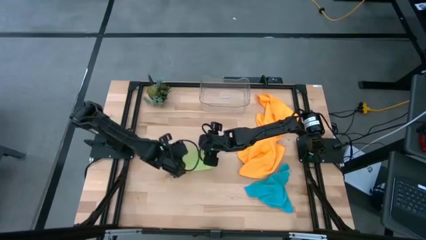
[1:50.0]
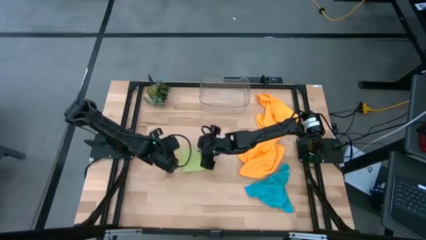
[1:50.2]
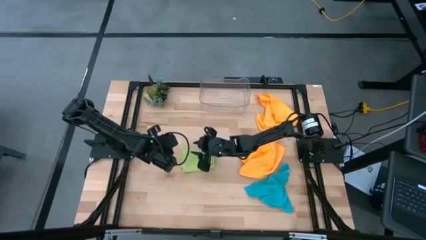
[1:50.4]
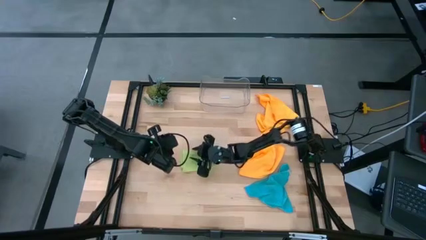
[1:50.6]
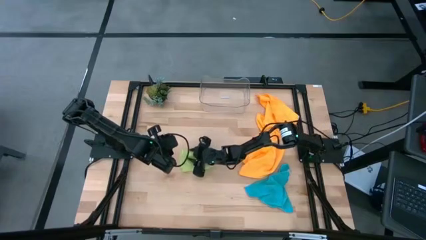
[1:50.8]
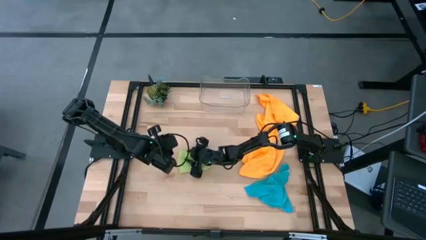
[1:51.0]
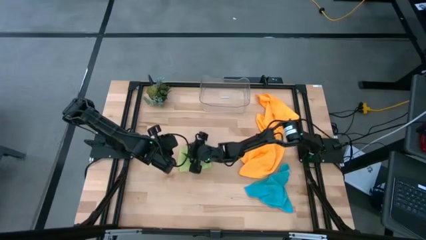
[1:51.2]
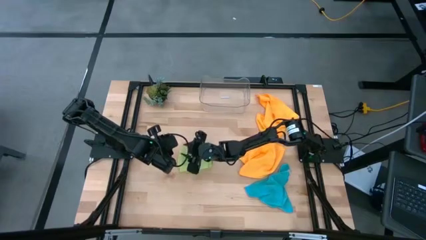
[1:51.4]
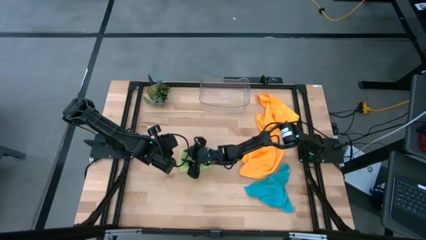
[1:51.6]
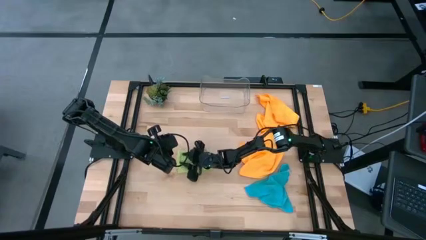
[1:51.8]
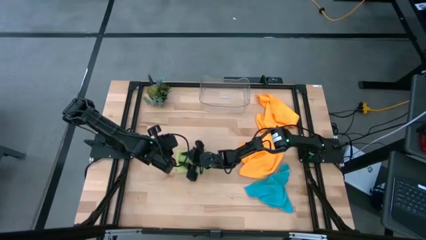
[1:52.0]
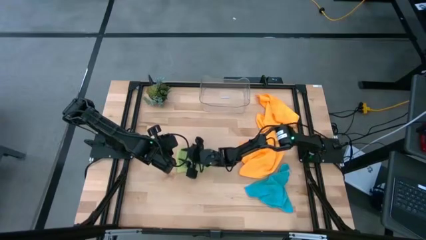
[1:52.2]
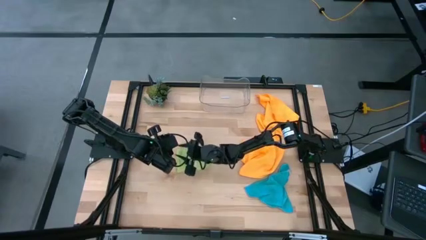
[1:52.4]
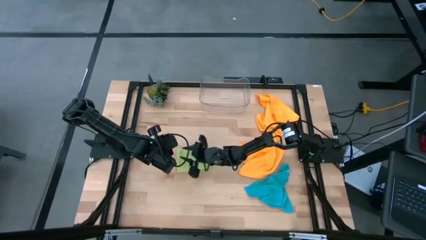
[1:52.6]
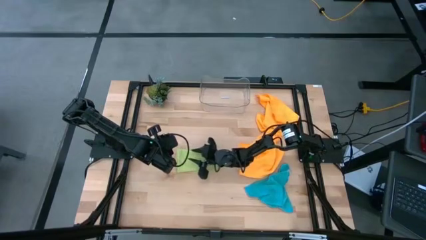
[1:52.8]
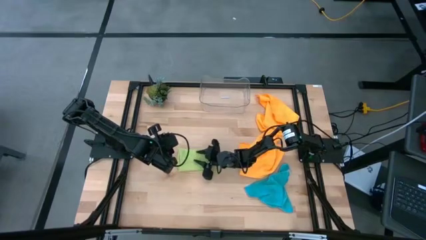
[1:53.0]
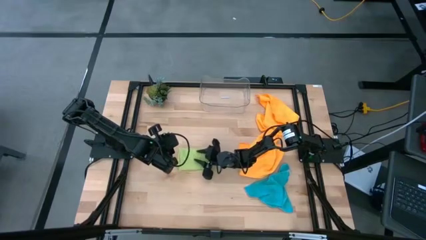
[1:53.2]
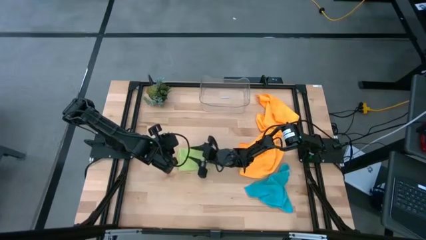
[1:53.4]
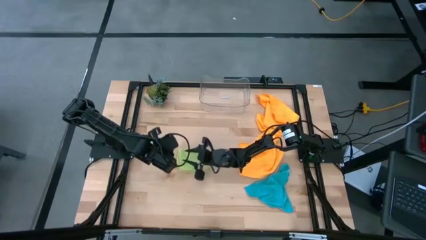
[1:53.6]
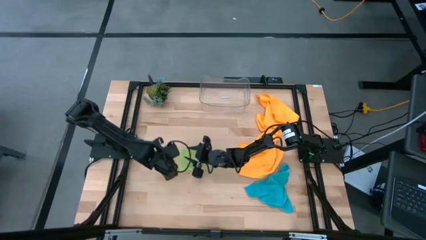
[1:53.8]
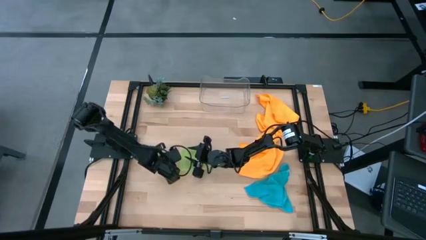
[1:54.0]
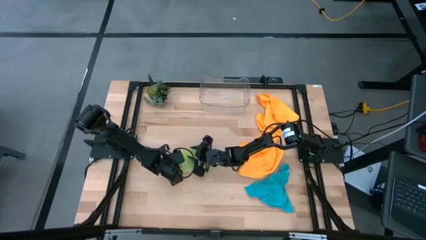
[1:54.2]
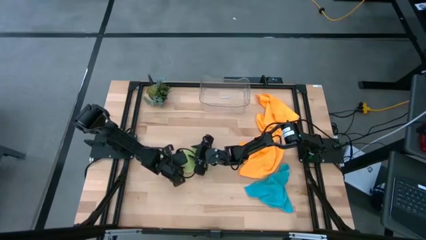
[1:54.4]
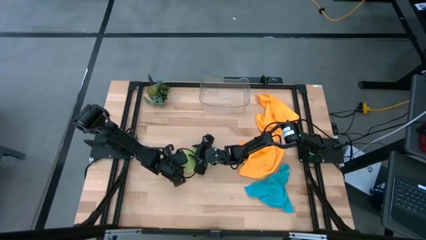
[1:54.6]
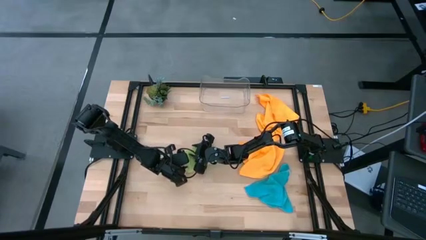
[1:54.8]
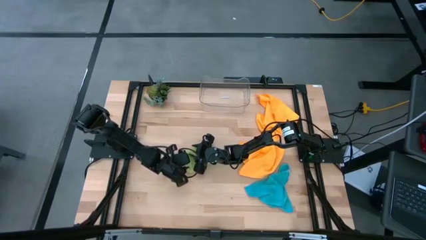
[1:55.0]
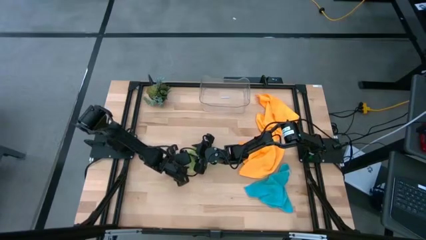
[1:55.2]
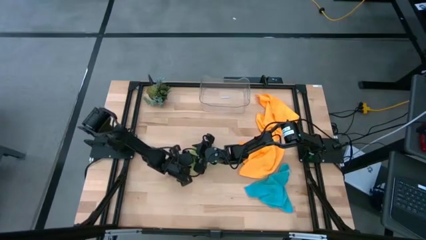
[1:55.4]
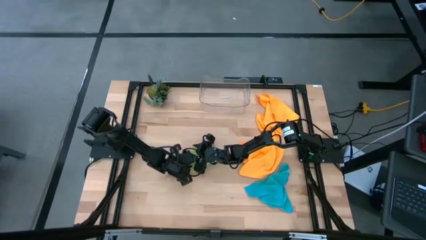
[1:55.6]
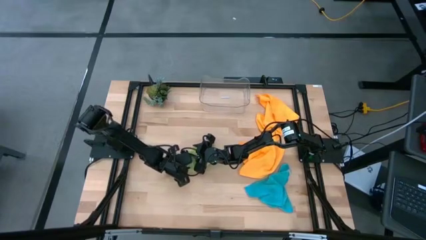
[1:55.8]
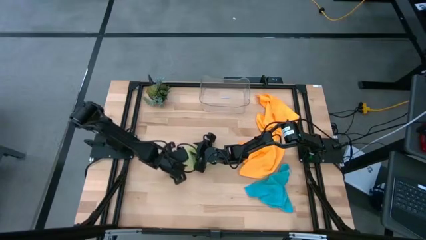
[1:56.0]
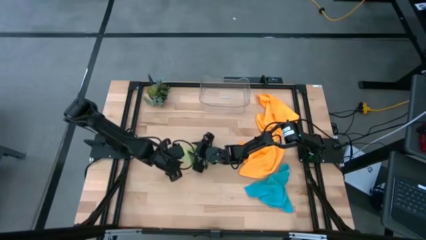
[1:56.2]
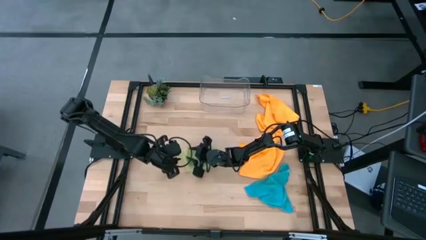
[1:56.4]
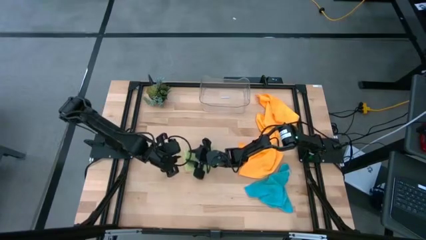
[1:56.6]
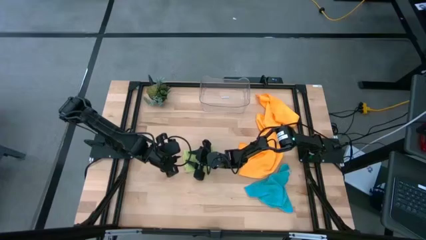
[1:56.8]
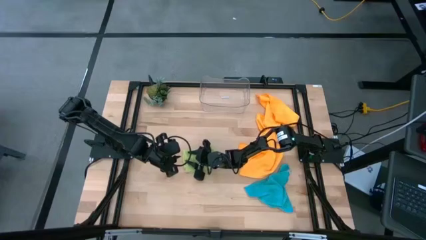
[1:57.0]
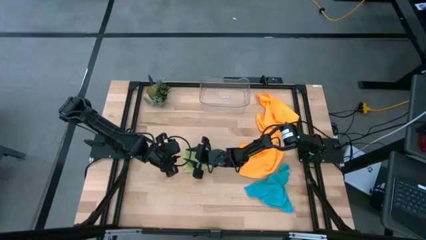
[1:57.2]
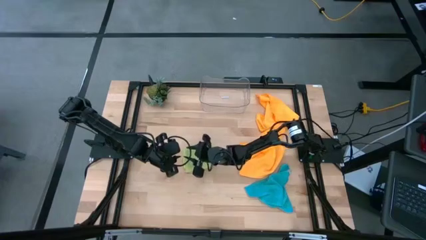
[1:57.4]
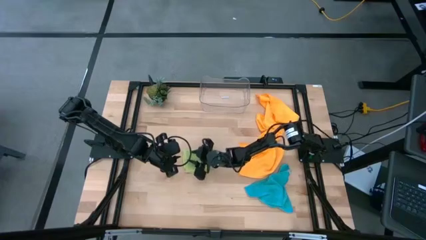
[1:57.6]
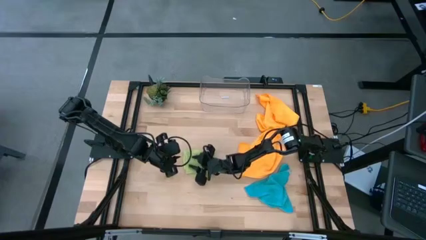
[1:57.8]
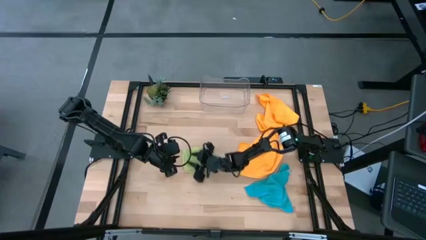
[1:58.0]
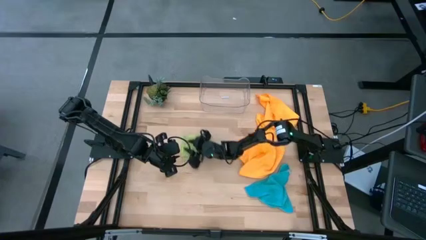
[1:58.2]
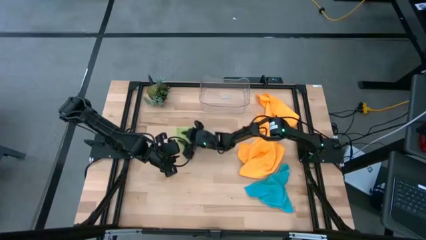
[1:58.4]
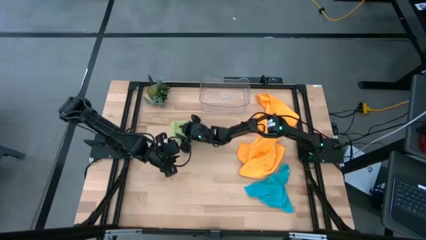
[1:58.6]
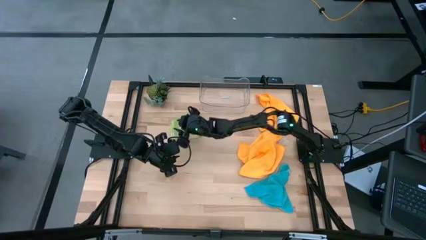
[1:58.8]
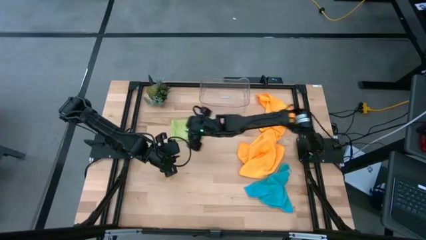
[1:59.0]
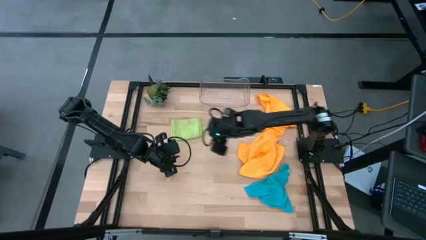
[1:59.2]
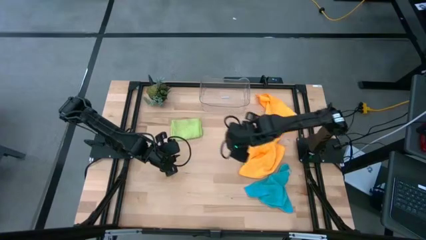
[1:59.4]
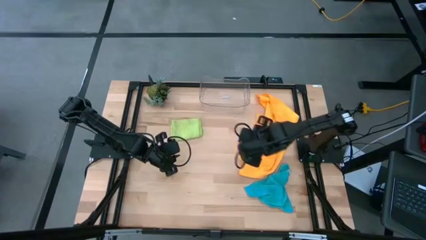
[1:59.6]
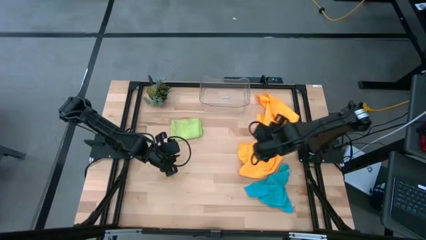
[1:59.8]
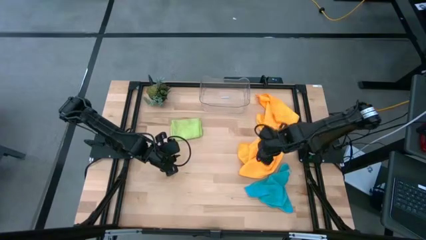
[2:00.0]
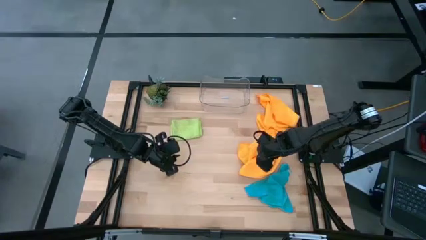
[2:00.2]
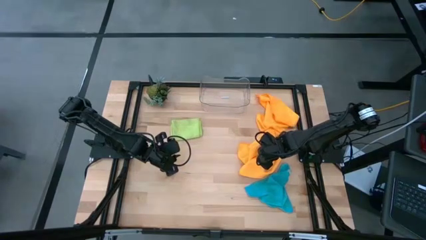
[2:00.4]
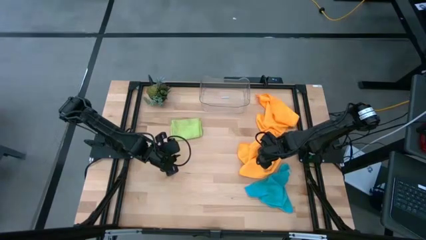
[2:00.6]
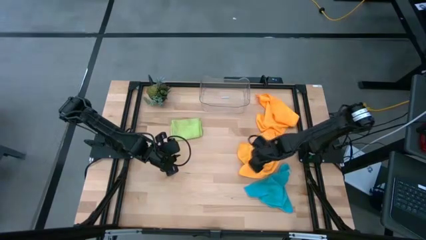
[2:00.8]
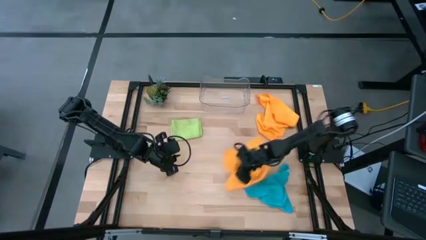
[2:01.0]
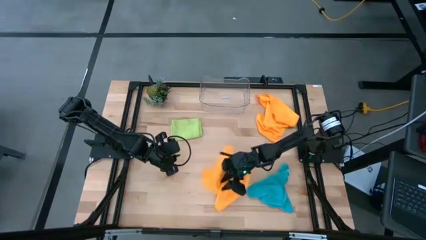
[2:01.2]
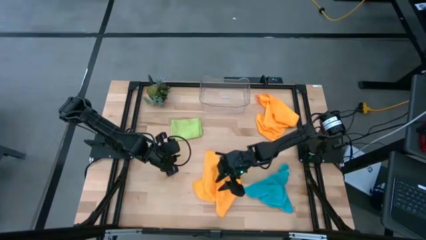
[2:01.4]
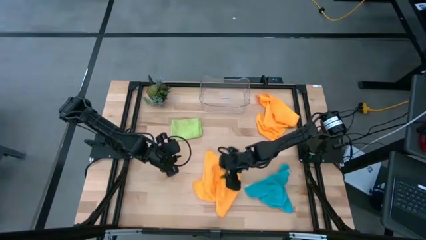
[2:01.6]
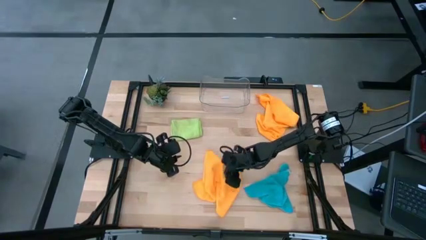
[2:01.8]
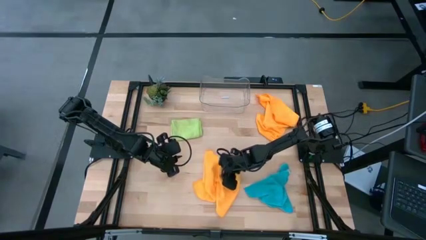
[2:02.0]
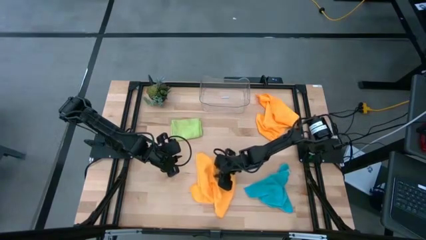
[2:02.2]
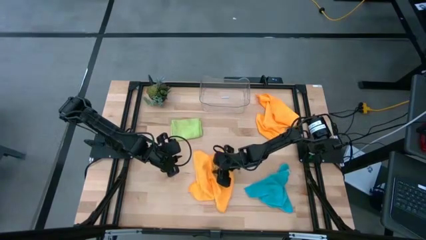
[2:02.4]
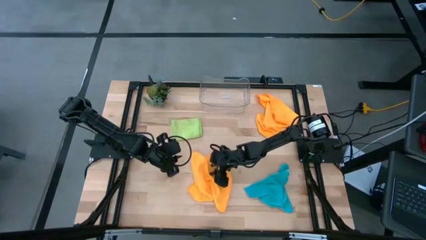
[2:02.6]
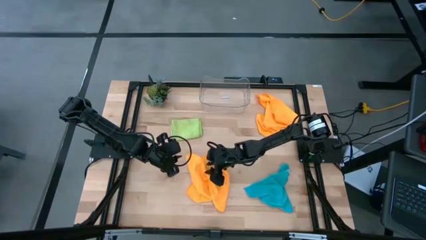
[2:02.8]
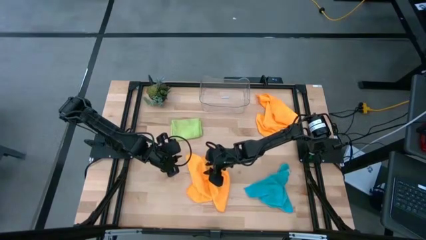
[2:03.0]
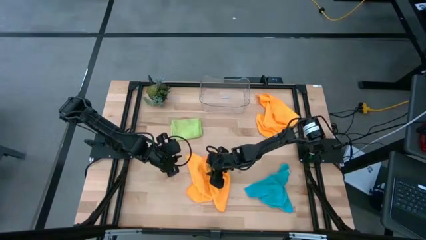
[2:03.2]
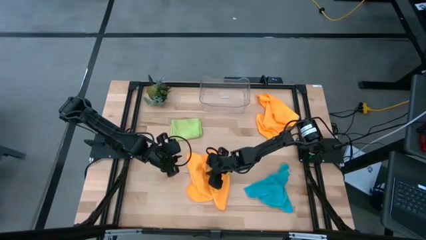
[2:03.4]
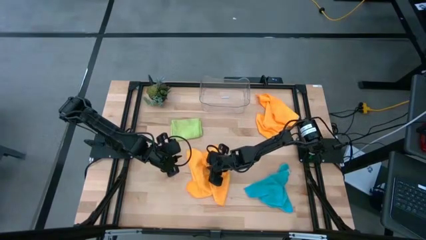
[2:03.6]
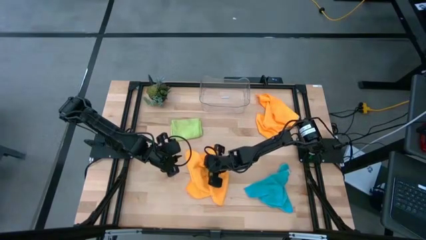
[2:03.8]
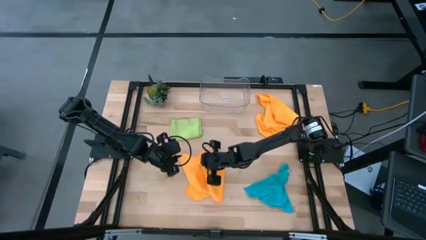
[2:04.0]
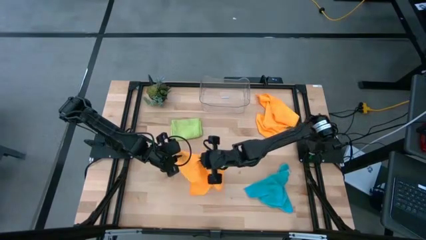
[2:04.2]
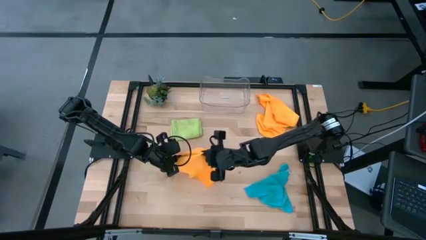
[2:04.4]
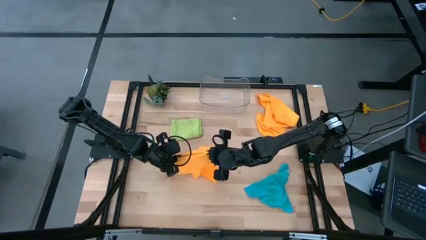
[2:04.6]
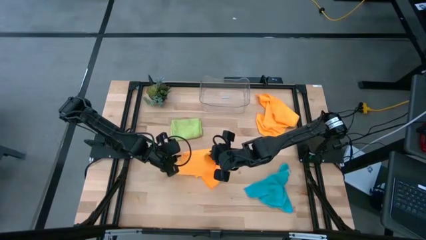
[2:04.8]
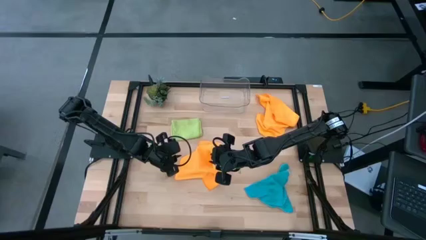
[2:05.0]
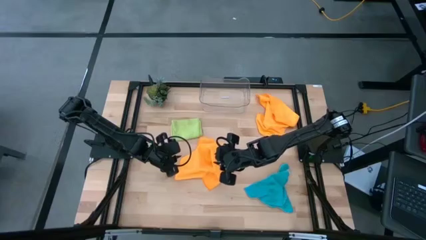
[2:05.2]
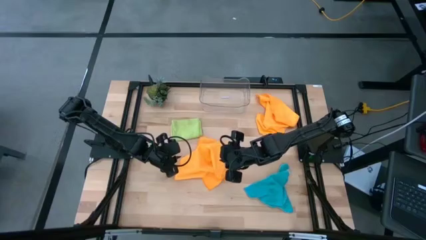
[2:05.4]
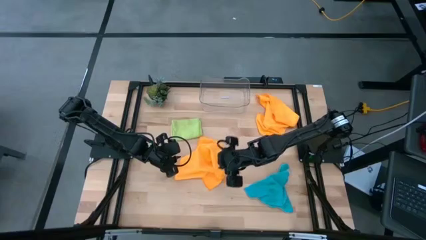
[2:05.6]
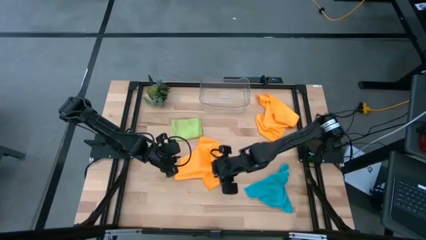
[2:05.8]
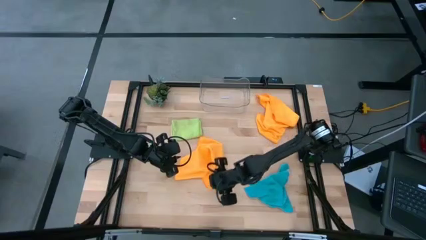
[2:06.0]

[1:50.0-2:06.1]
Task: Fold microfiber towels
Fold the bottom microfiber cloth

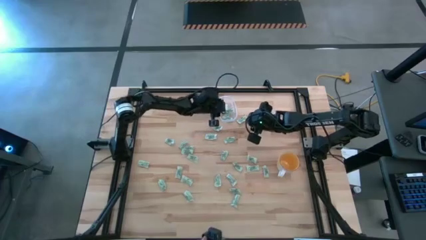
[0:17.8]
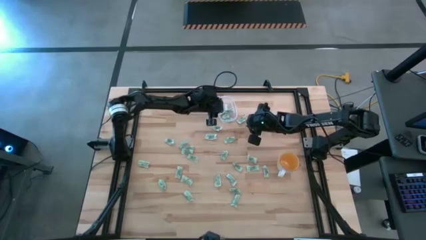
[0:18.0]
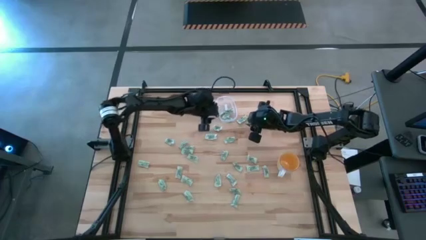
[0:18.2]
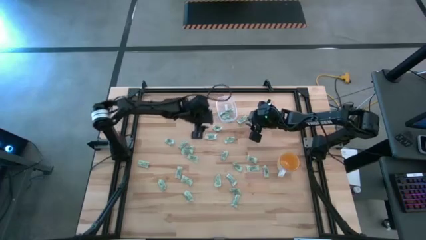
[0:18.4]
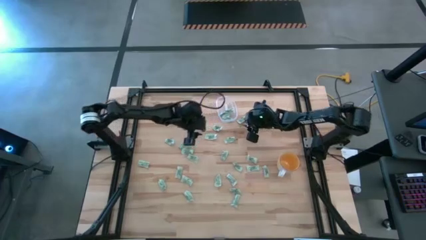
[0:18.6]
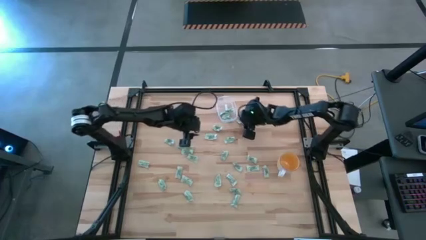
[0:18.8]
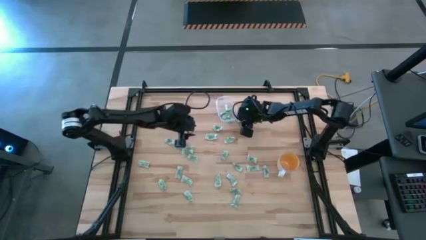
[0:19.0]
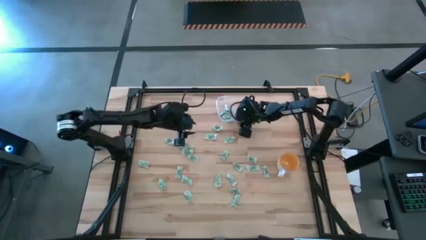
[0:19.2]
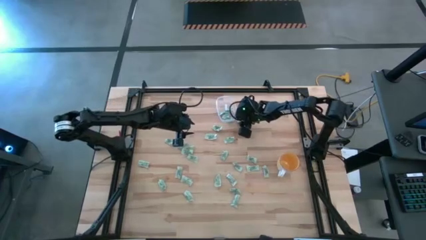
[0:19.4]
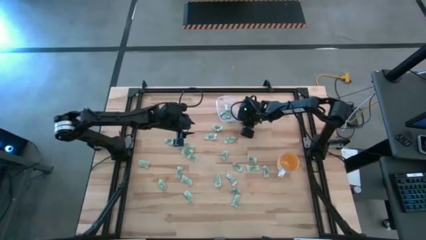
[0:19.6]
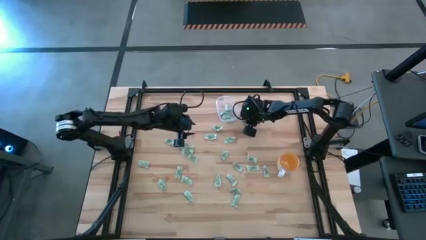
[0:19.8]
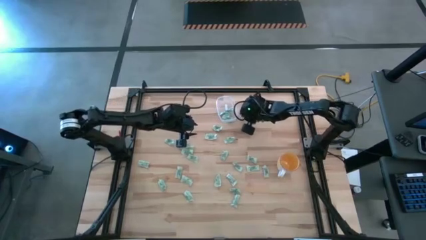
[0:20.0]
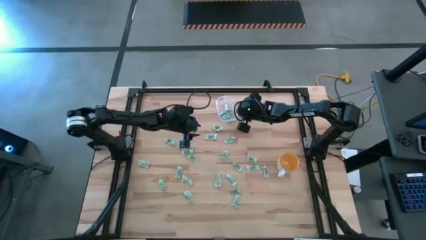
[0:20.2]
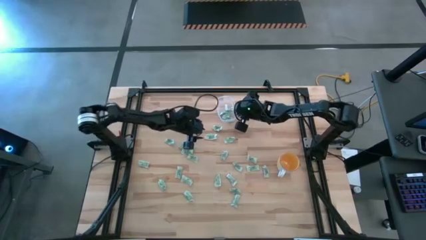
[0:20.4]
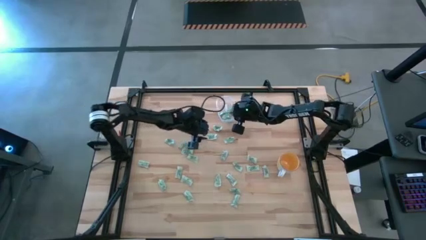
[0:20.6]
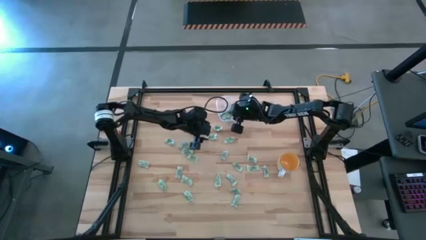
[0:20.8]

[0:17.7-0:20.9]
Task: Pick and place Stevia / Truvia into bins
Put the green stevia packet into the transparent bin
